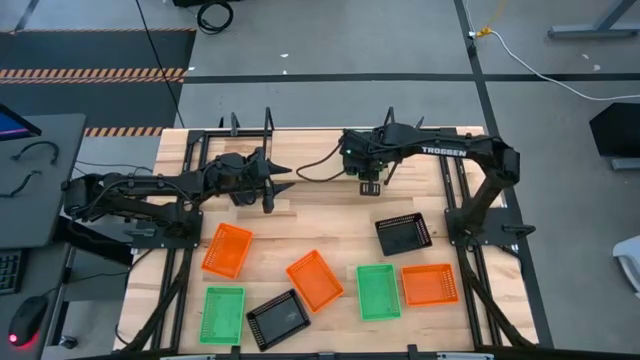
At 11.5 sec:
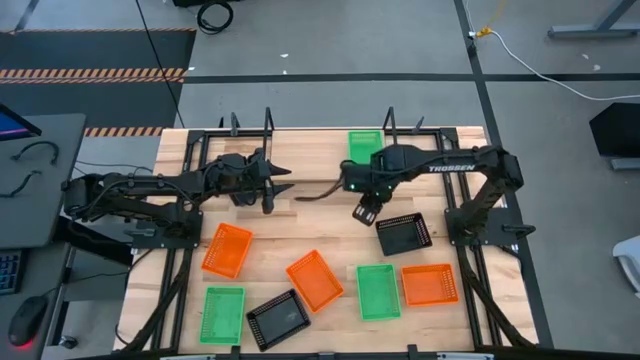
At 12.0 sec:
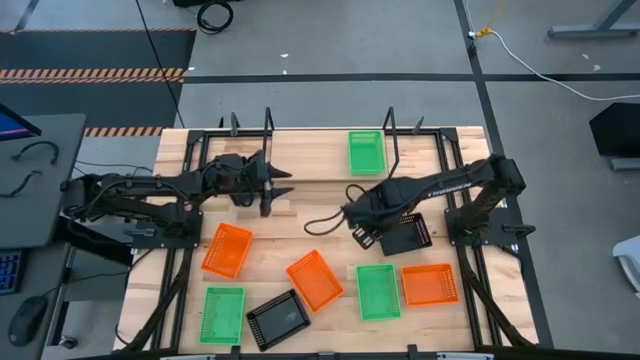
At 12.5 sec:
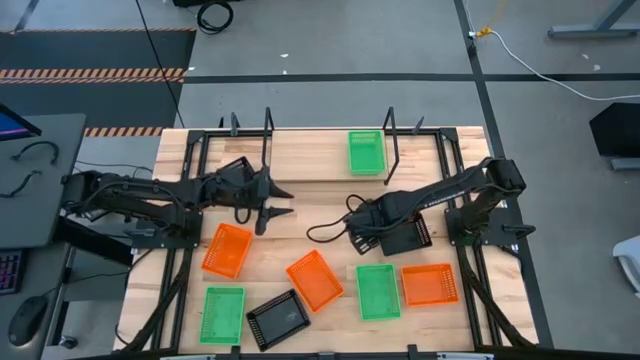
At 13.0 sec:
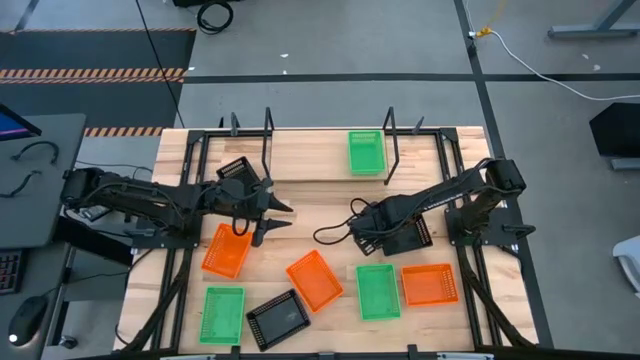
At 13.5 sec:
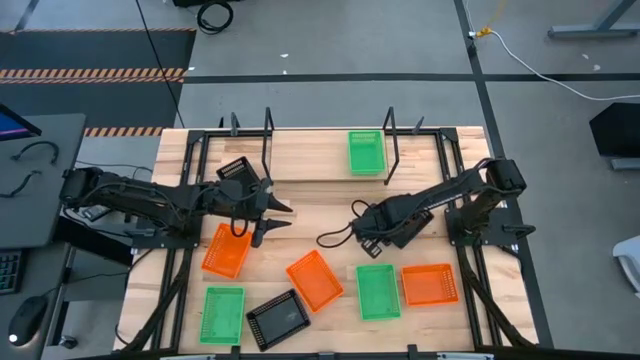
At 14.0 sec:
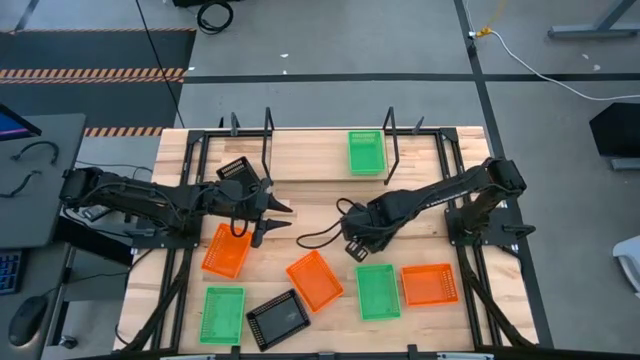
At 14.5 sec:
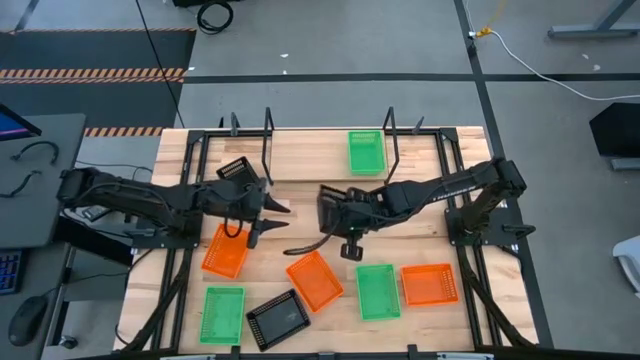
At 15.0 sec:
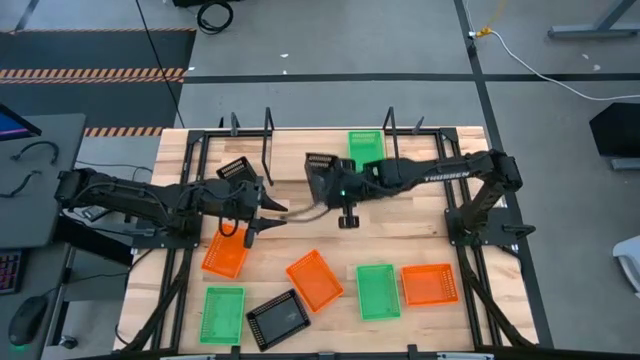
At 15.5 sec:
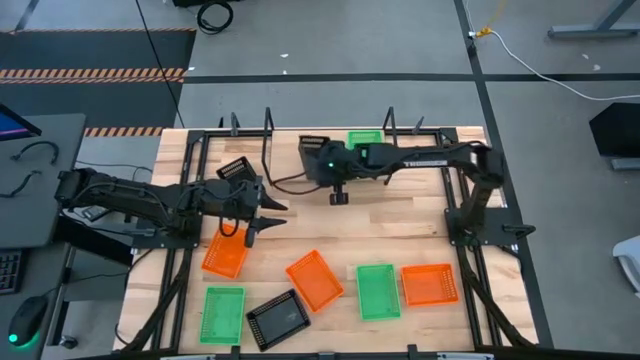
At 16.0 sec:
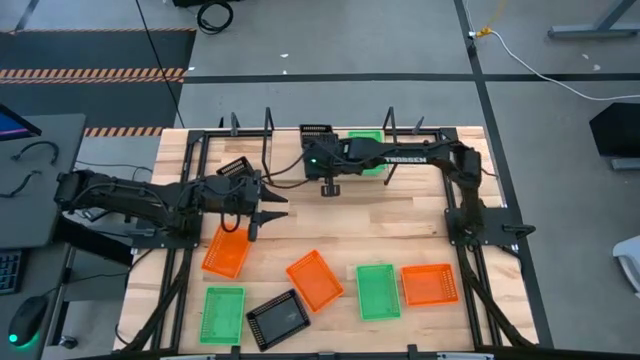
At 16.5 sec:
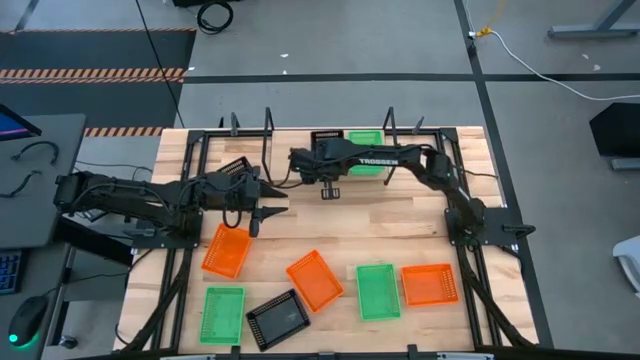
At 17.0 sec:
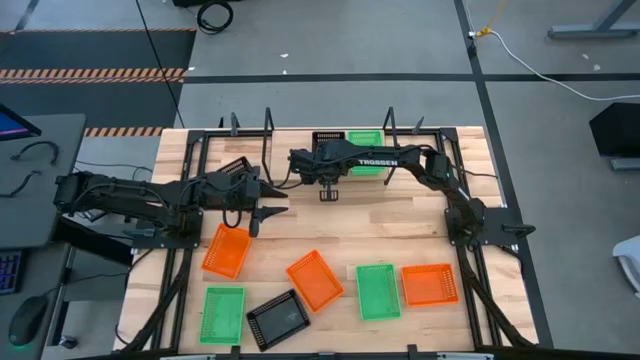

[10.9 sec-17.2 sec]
Task: Stack baskets on shelf by color
Put the middle right black bin on the shelf

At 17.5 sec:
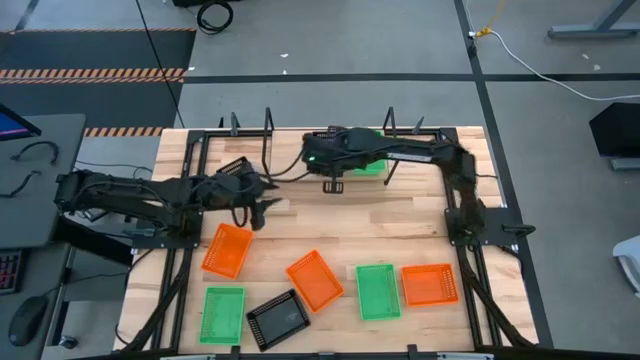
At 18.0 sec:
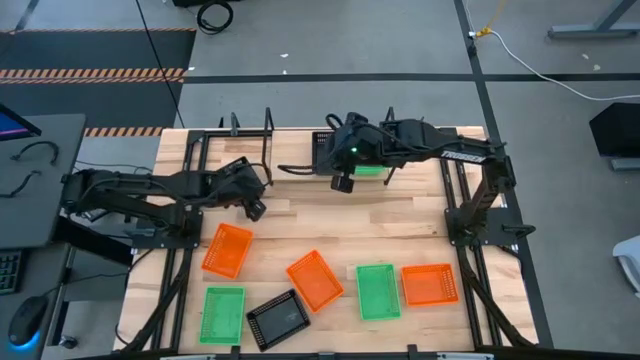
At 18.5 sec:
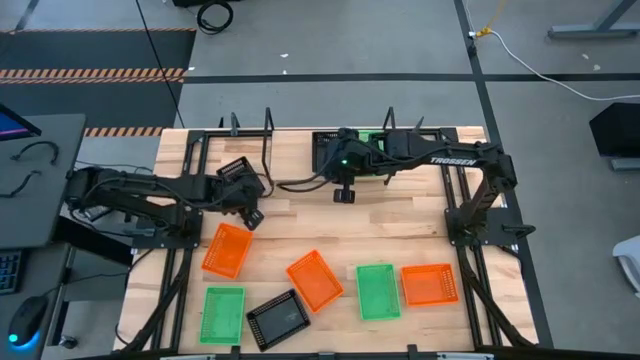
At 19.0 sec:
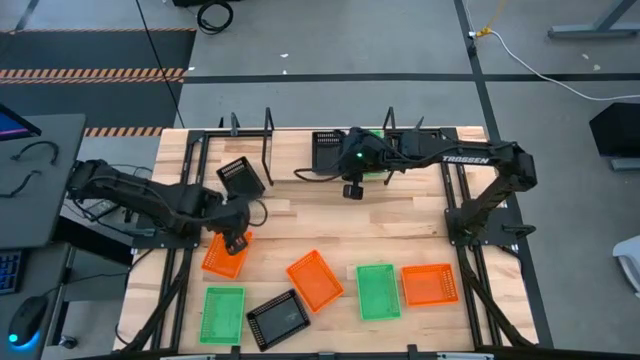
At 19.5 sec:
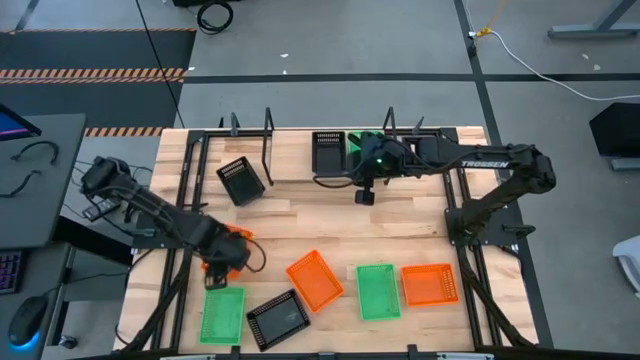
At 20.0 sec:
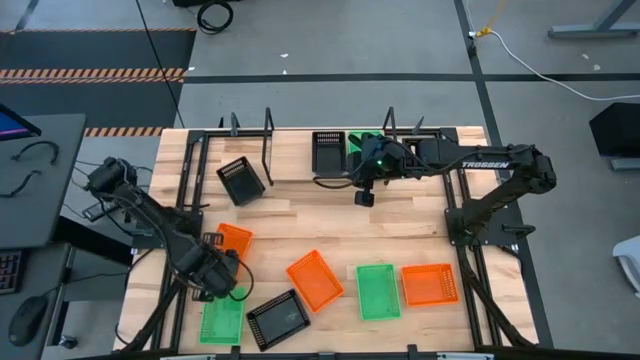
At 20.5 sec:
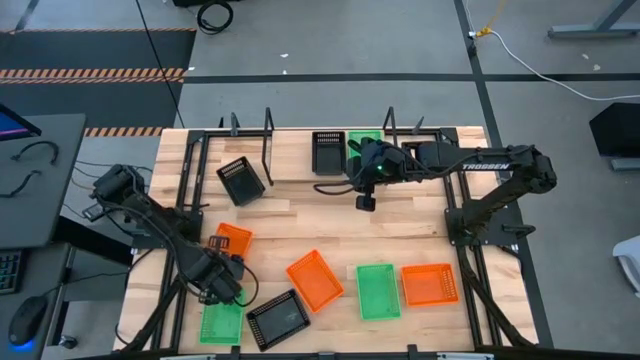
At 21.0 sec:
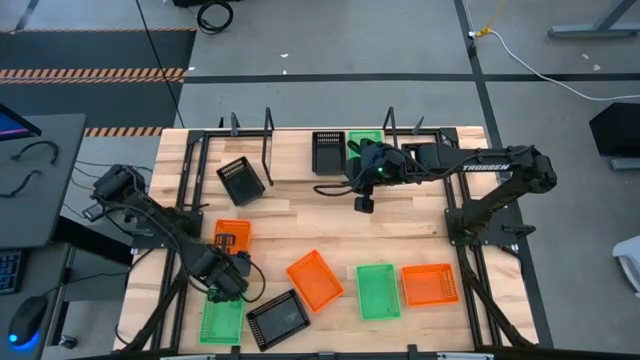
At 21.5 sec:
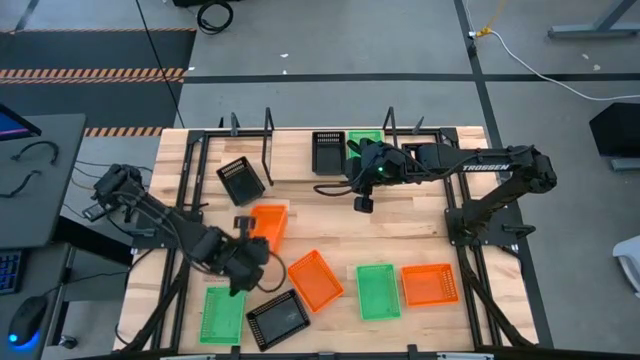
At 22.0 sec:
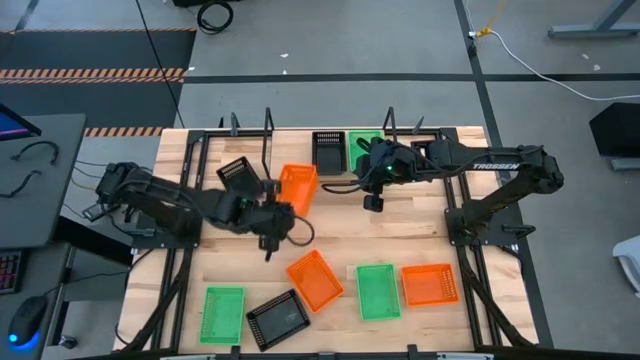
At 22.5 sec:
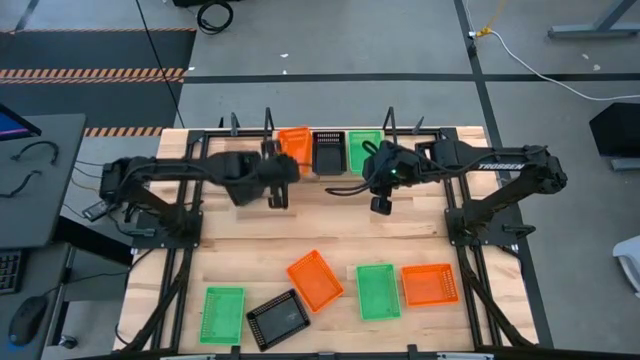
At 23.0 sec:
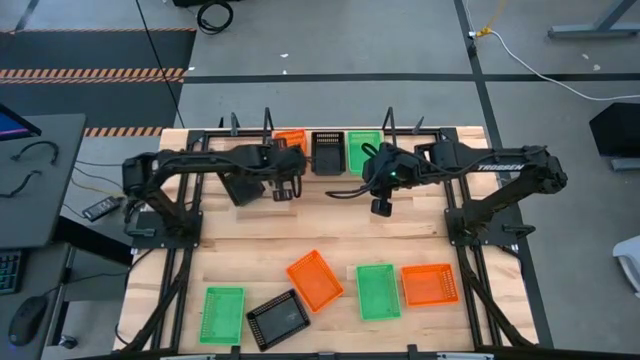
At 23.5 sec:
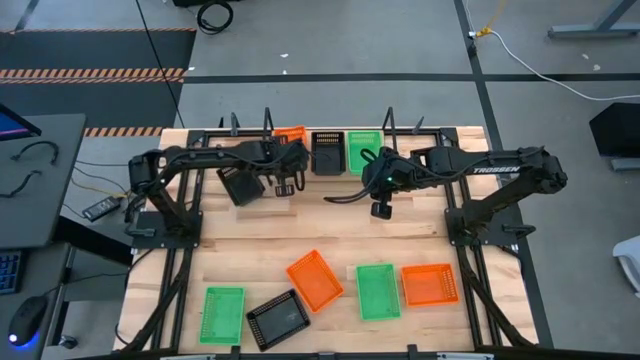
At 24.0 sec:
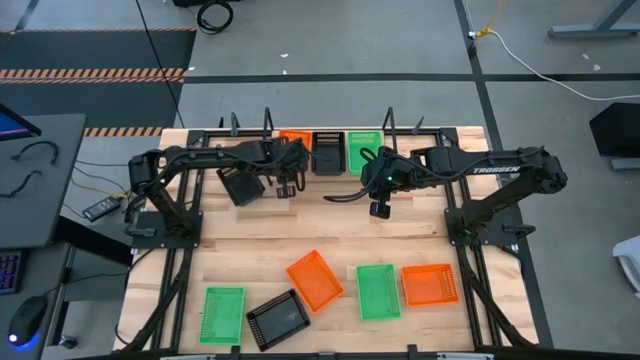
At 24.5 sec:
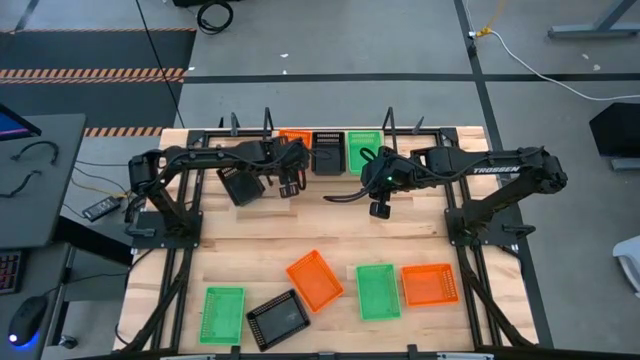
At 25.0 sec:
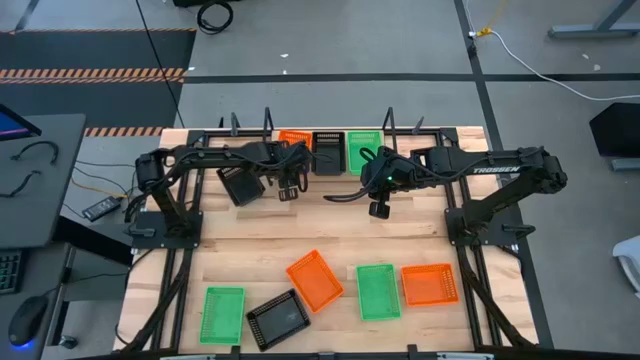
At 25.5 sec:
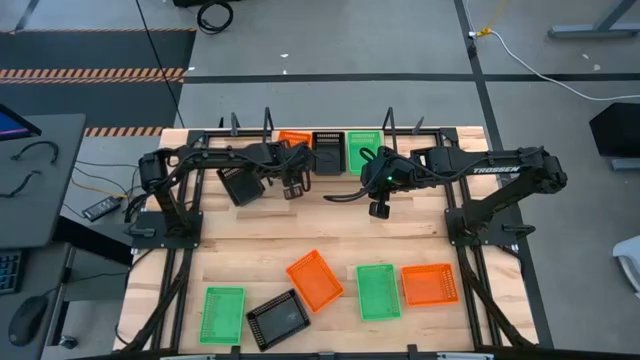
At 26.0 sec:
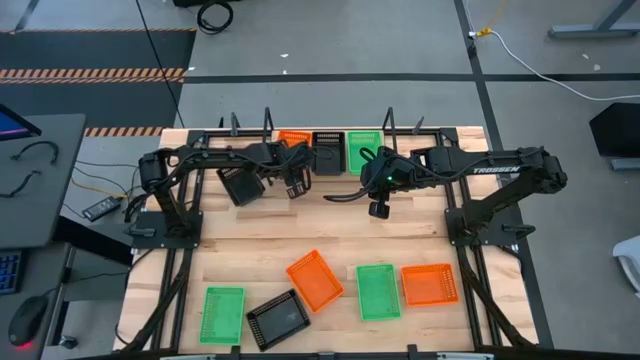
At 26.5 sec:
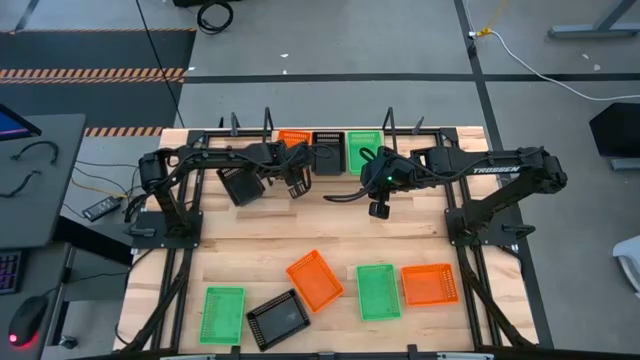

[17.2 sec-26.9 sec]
Put the left orange bin on the shelf

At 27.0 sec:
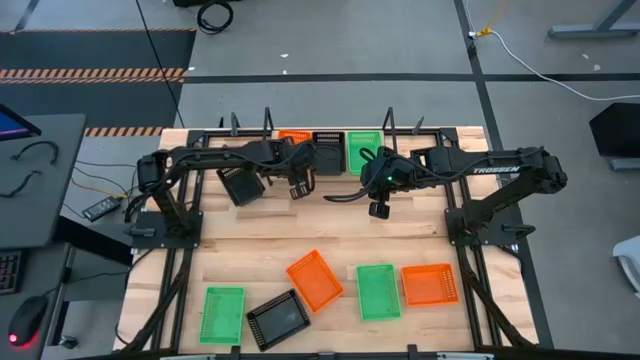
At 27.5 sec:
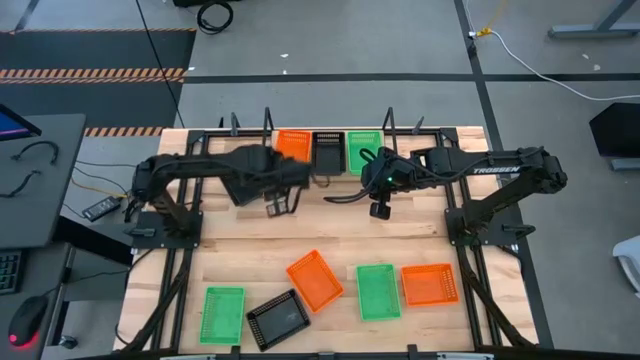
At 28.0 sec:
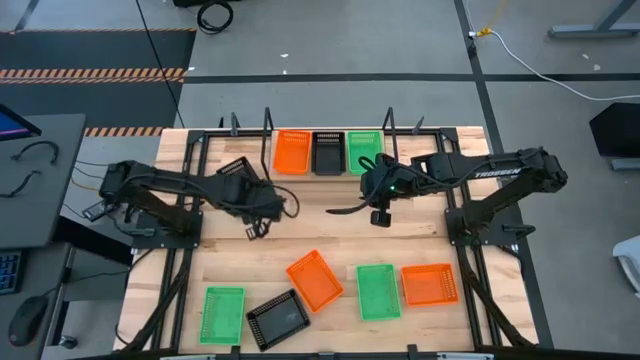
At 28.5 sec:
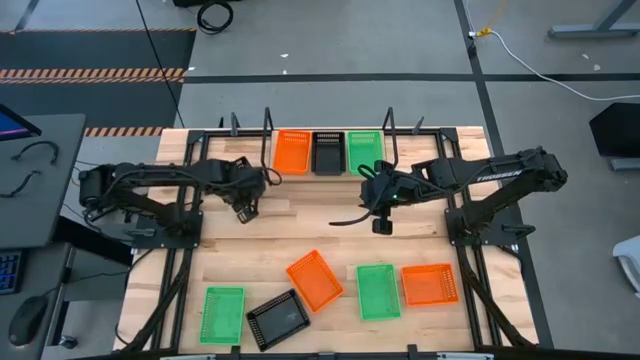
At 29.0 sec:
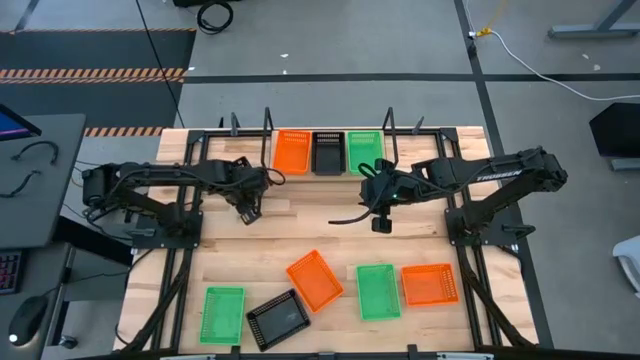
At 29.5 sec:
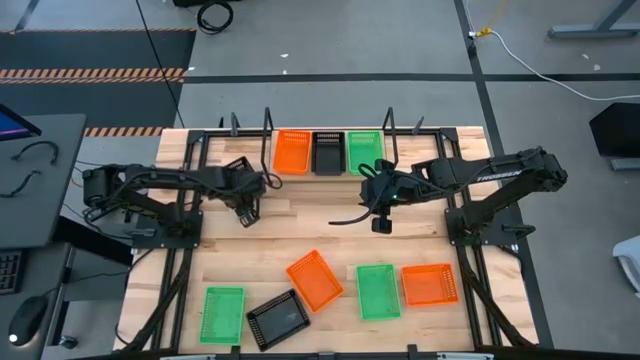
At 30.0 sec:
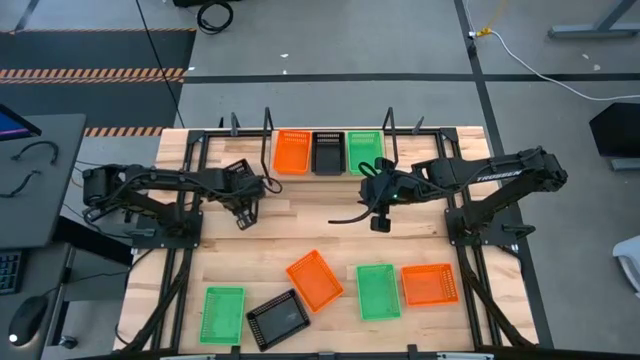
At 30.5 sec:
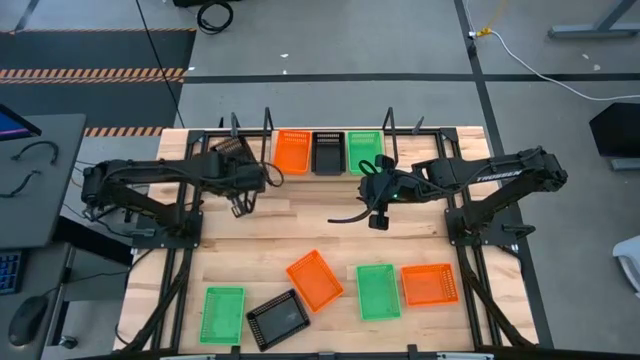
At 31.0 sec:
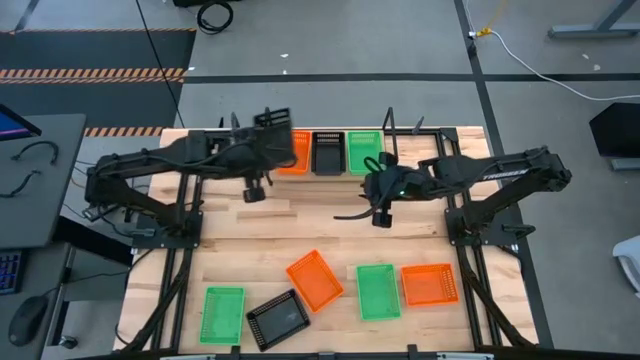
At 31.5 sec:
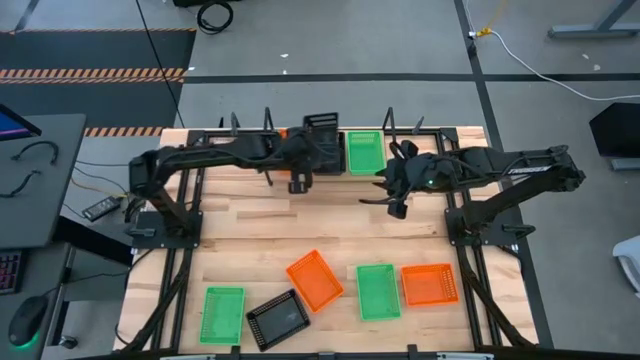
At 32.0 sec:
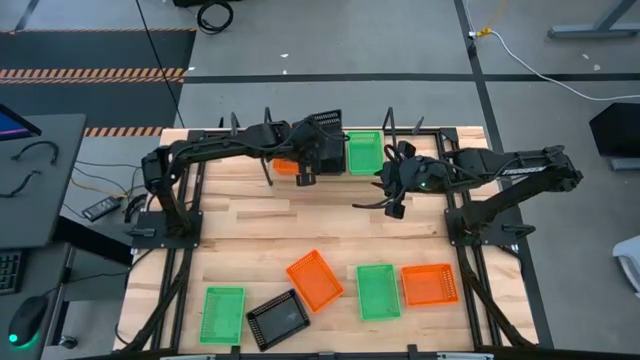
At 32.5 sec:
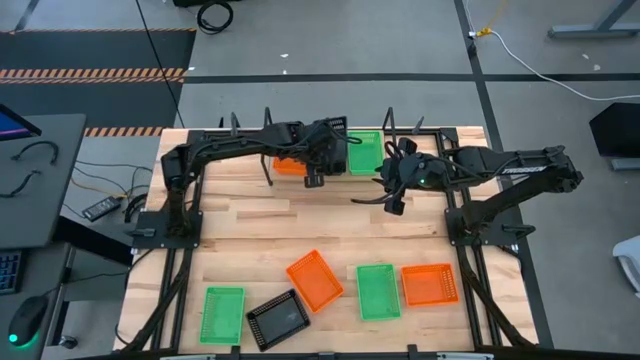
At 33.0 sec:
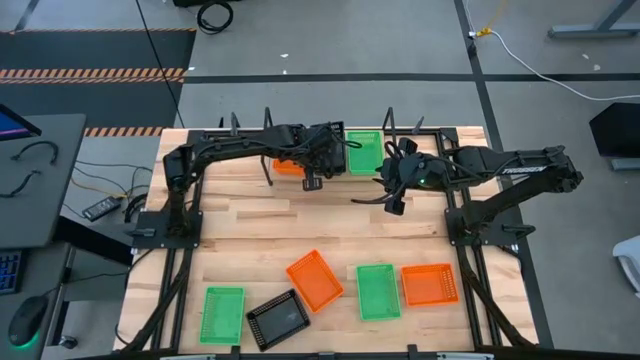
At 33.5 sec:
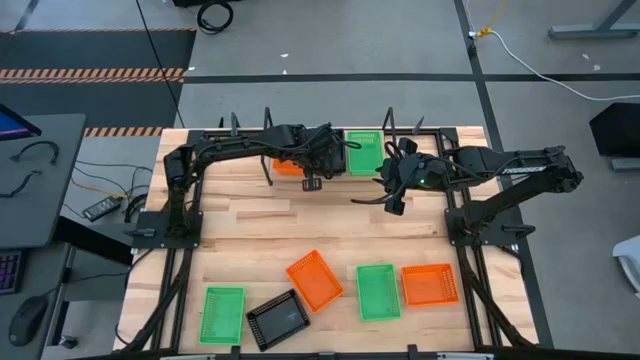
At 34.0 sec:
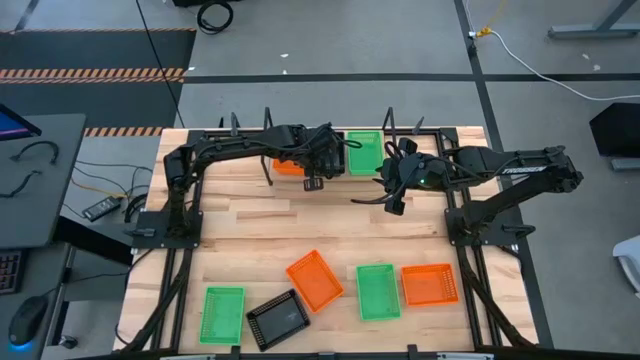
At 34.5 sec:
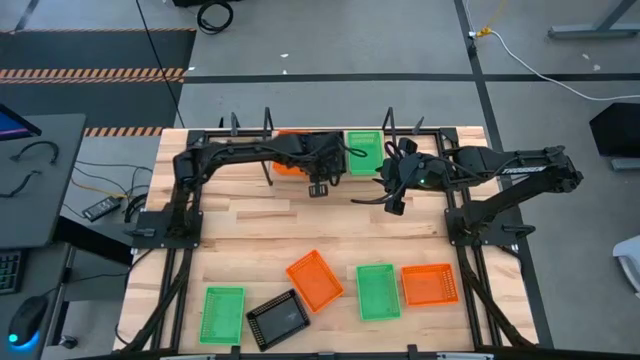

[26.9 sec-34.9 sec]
Stack the top black bin on top of the other black bin on the shelf
